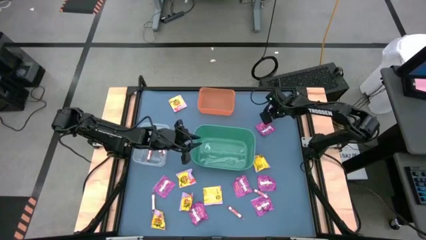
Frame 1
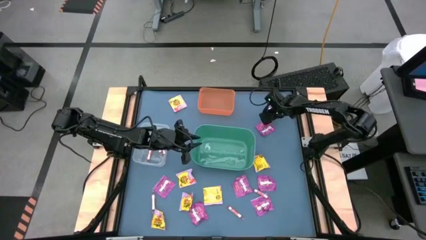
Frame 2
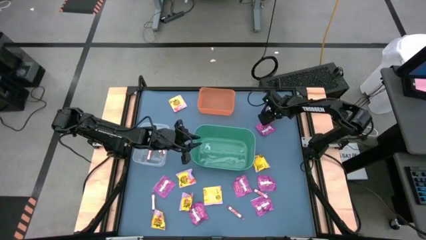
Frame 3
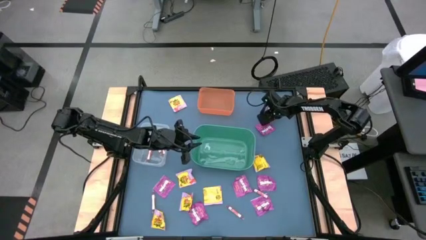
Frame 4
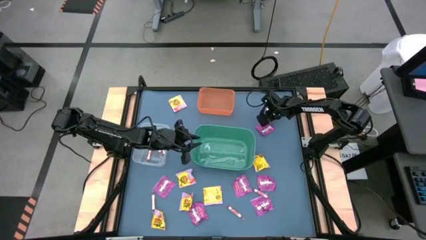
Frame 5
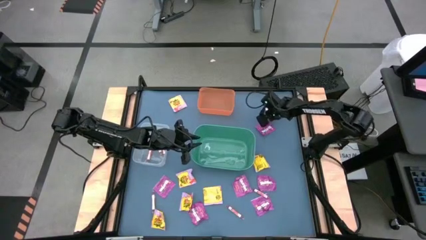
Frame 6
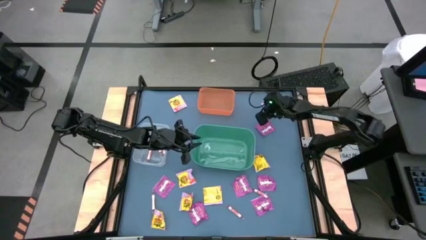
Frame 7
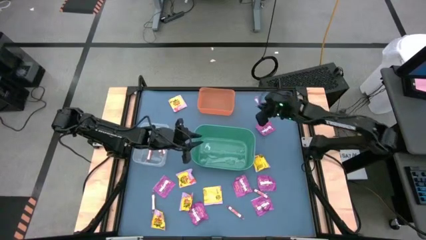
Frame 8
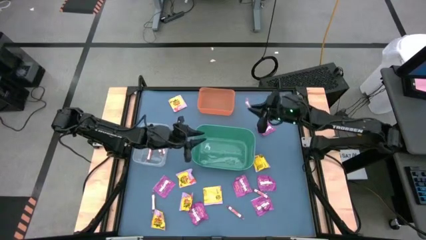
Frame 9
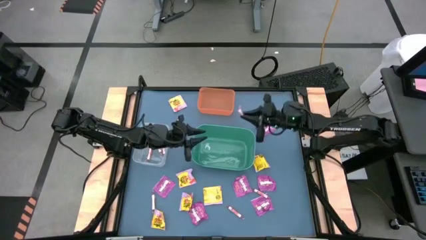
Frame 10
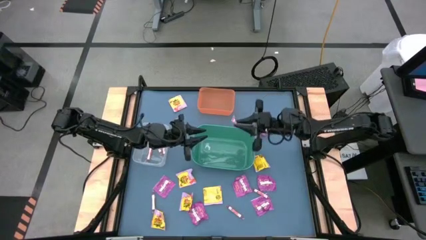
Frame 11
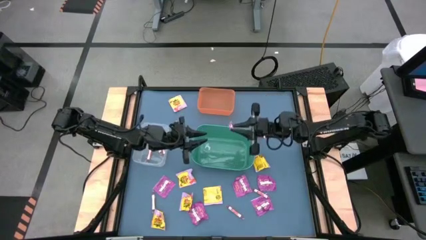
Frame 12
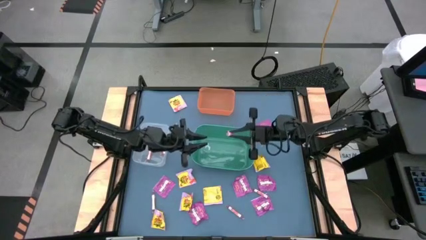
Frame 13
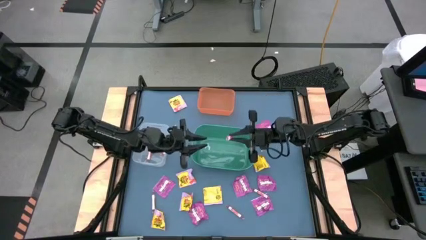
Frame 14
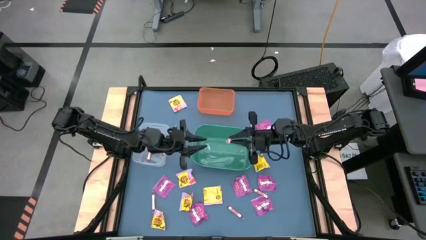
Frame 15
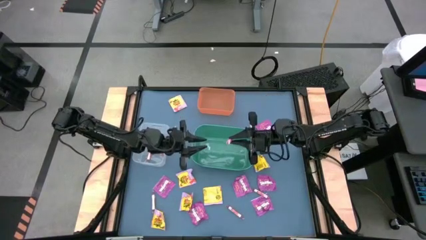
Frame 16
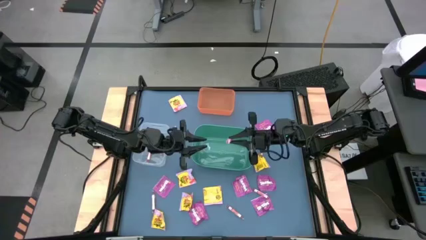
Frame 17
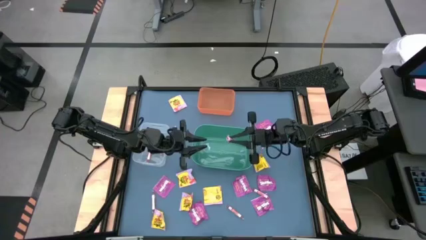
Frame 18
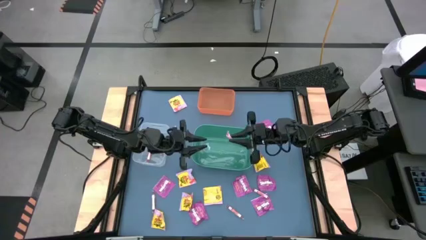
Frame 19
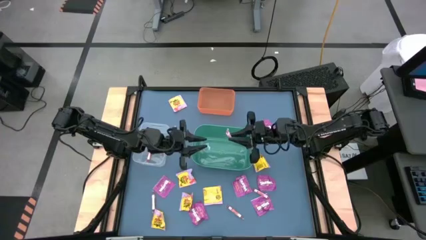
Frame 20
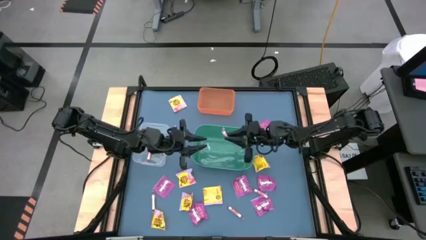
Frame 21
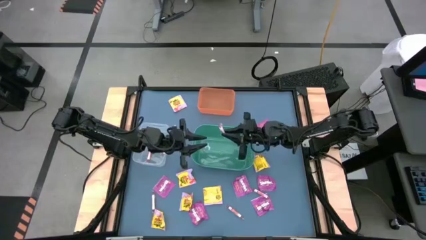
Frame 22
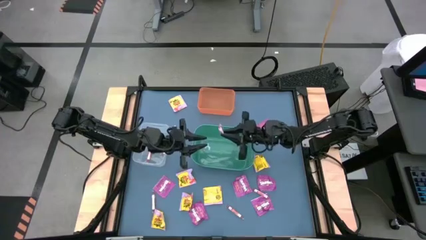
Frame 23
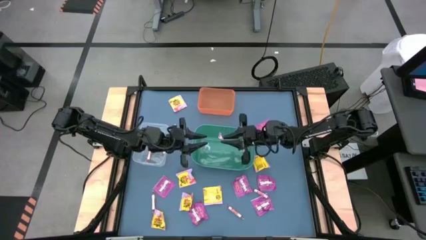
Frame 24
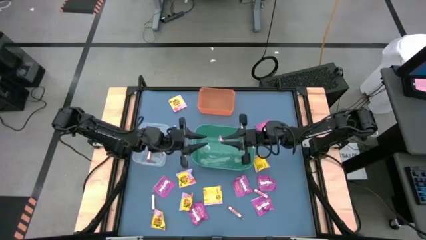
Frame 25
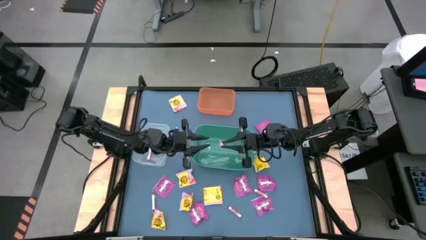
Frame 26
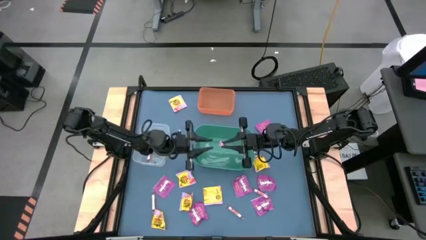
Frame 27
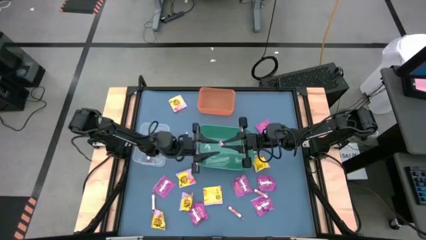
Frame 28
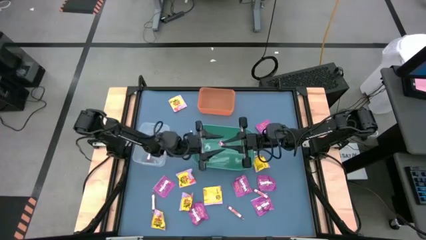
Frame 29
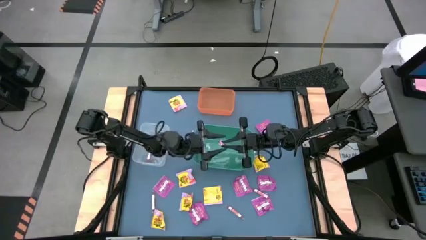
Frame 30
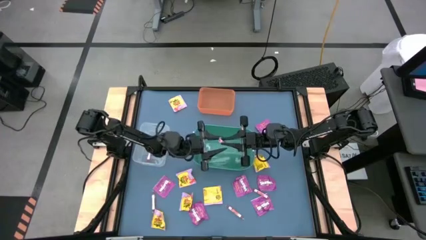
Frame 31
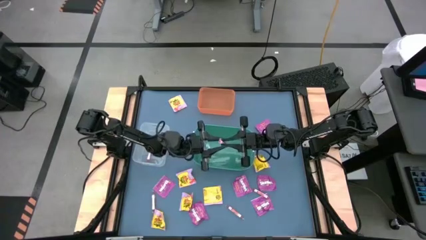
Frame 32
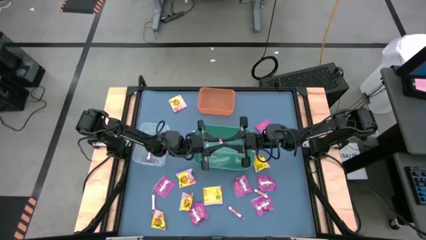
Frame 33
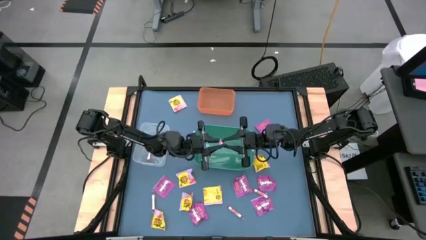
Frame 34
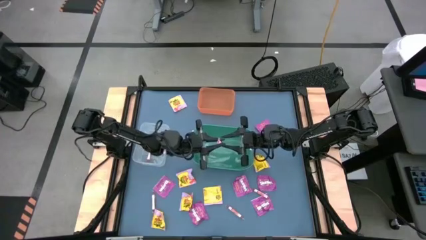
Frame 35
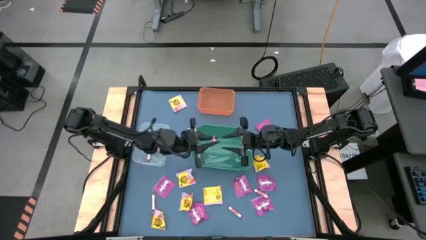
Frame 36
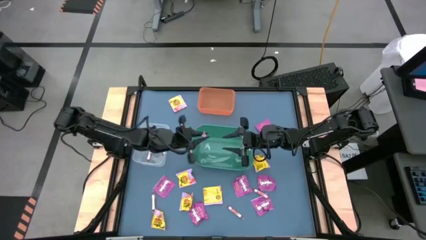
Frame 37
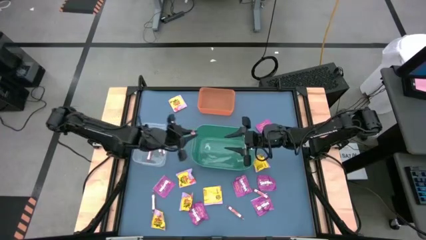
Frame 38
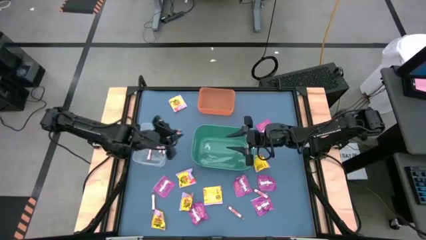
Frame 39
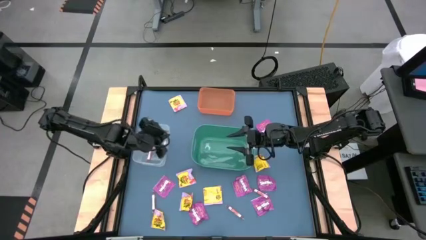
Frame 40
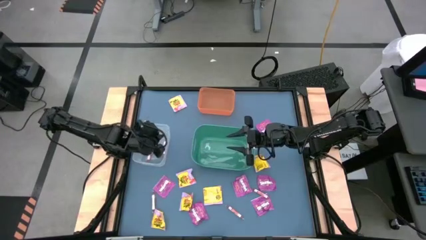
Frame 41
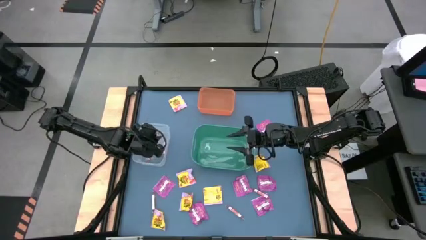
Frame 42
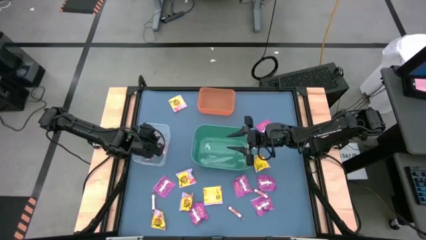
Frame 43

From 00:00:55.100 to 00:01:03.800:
Task: Sort candy
Put the orange candy into the transparent bin

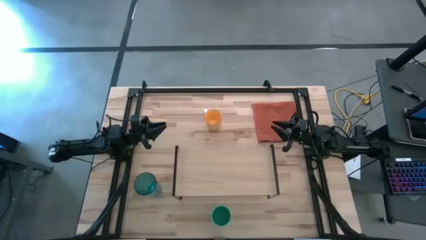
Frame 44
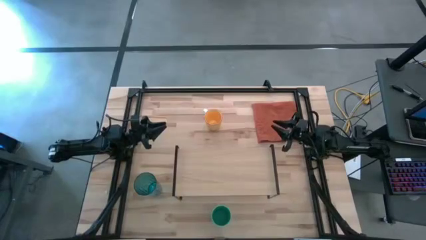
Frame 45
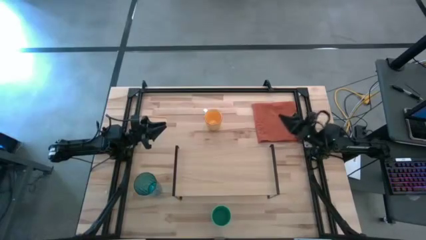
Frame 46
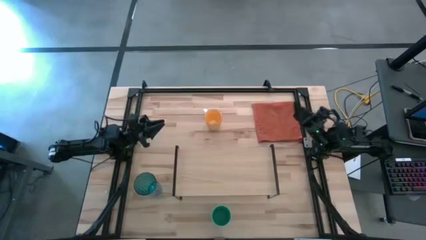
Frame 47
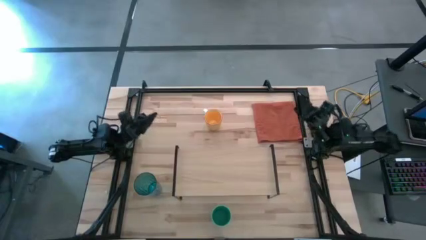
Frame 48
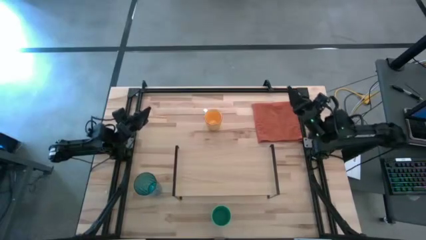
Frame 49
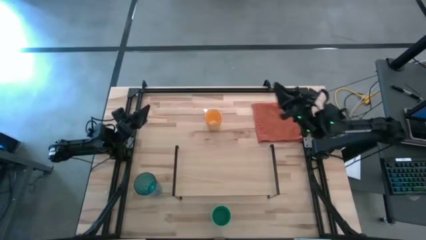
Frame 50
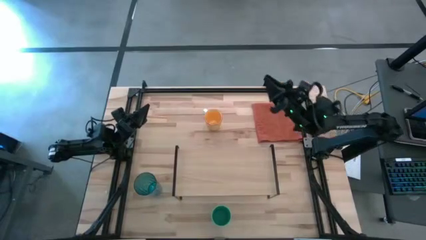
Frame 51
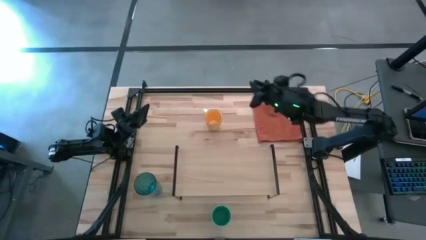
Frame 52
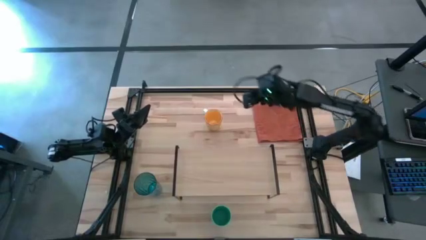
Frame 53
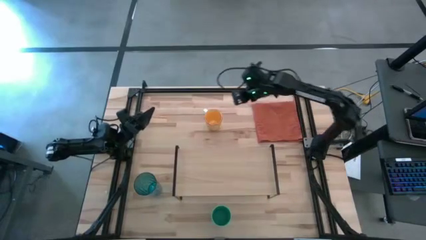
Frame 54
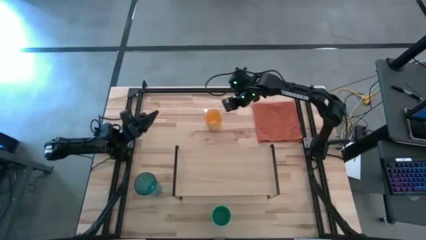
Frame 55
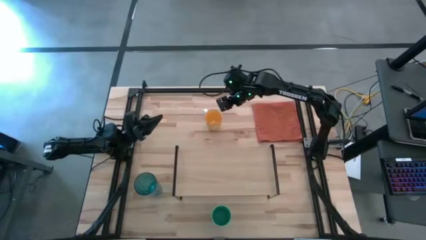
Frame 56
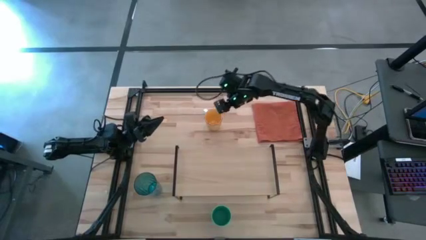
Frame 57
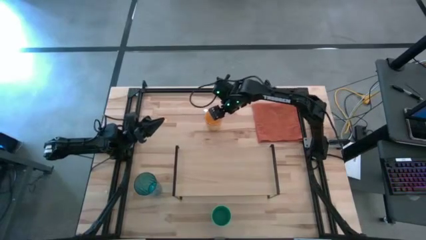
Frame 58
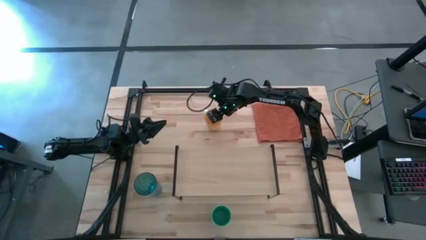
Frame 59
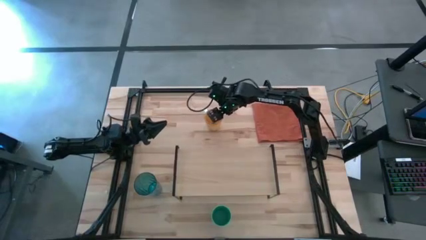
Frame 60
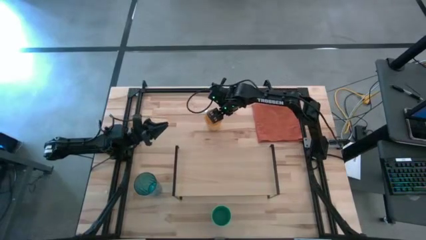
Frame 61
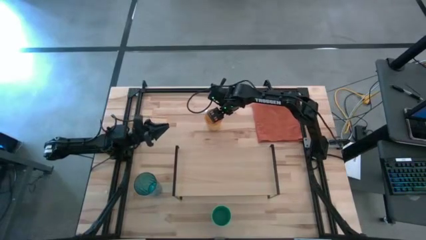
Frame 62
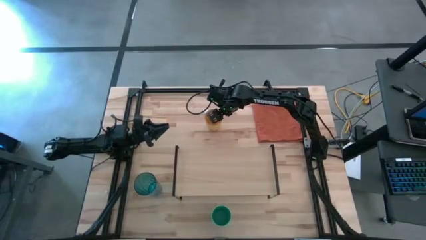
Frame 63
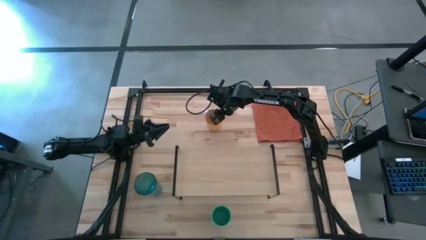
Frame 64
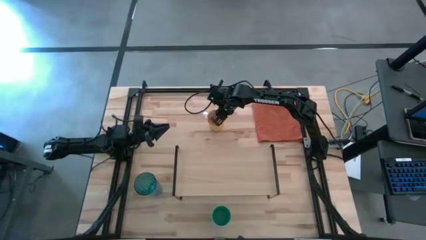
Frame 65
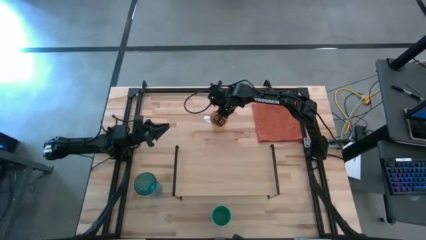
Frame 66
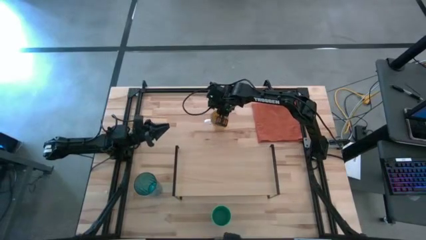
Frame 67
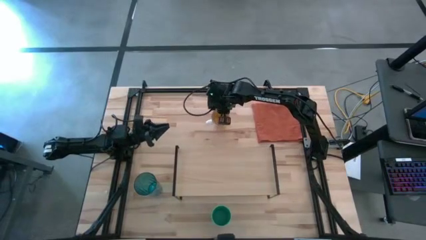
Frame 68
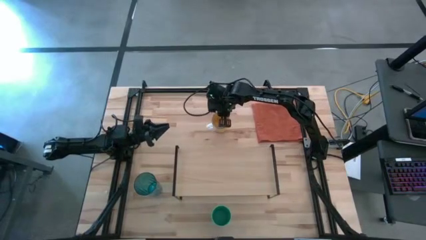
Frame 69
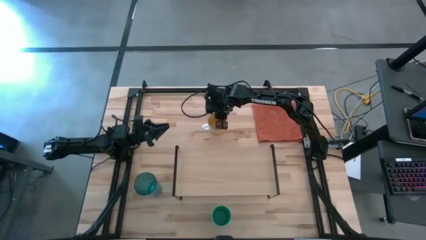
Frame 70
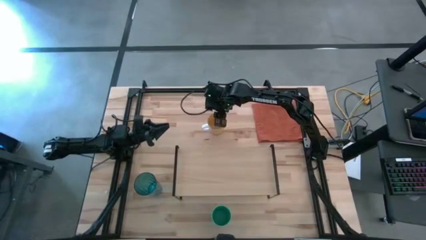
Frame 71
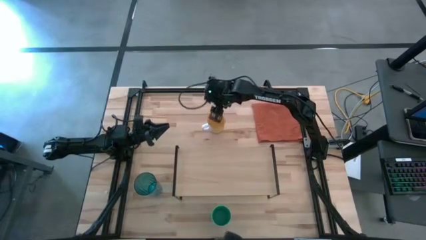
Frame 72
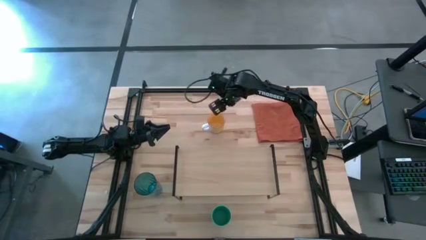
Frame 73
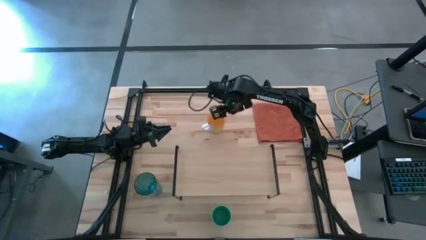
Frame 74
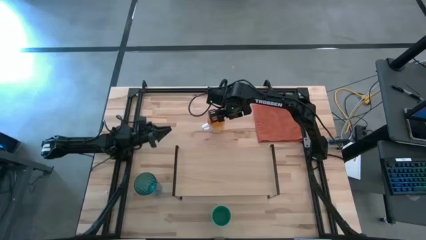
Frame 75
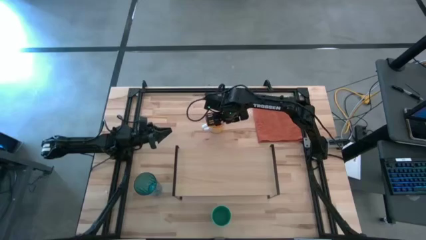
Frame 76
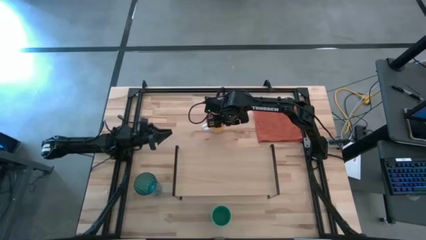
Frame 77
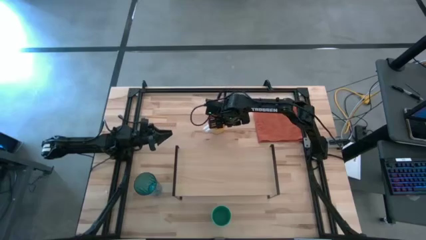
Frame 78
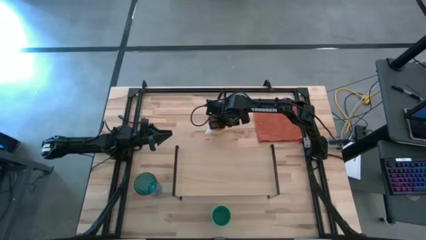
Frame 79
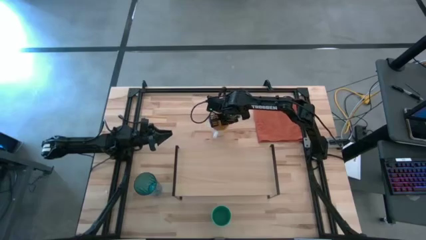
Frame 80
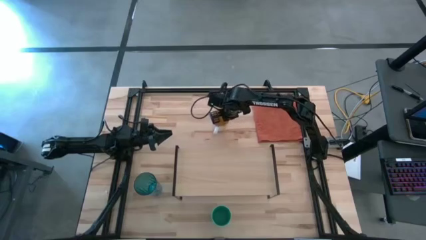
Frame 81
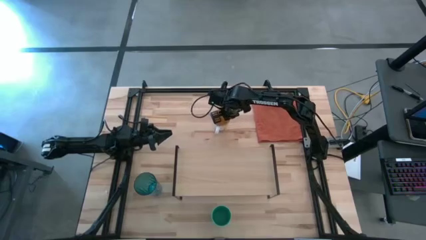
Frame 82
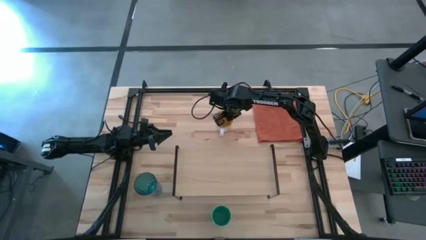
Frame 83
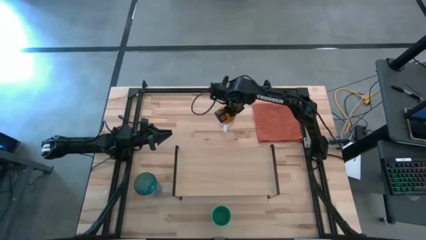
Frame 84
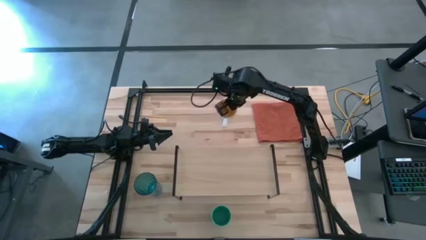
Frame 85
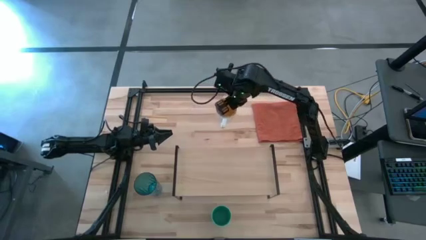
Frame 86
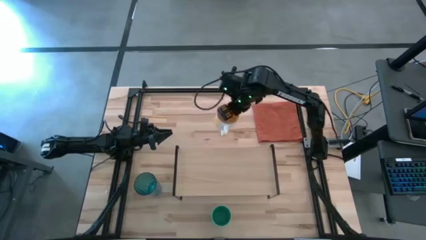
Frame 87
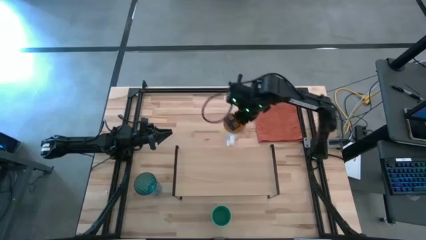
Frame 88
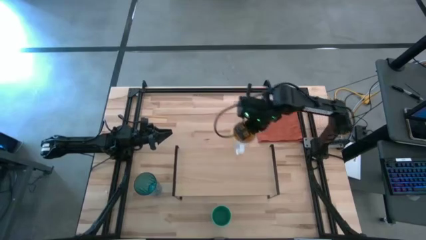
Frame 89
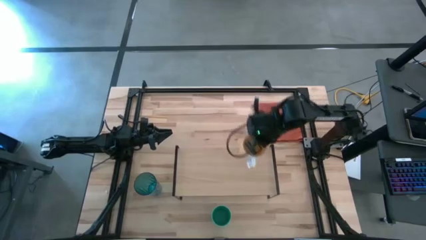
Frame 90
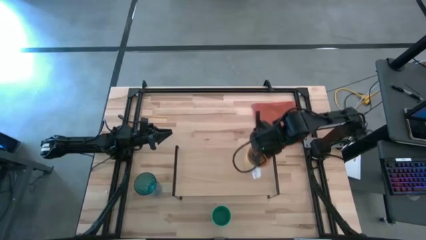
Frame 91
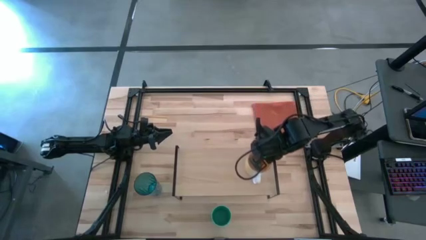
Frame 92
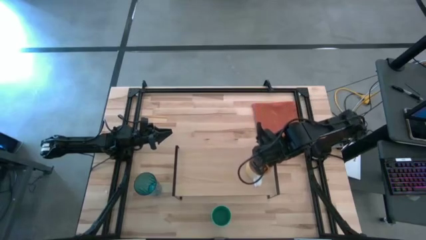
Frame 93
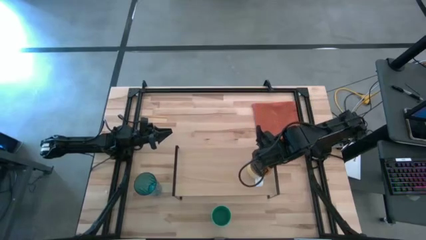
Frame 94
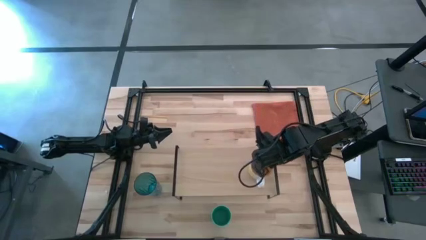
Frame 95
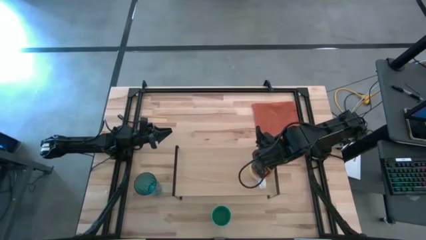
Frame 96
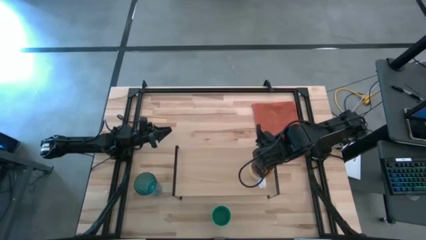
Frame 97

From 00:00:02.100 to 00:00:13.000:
Task: Stack small to large cups/mugs on shelf
Put the yellow mug on the shelf
